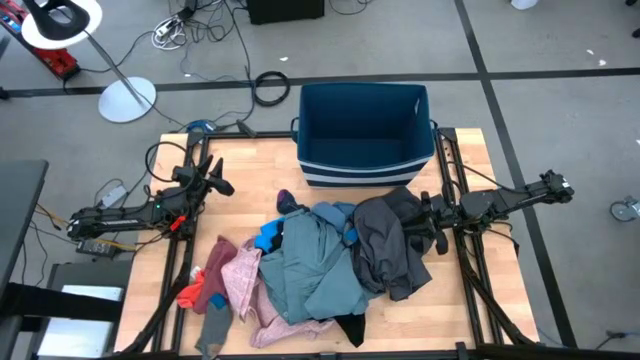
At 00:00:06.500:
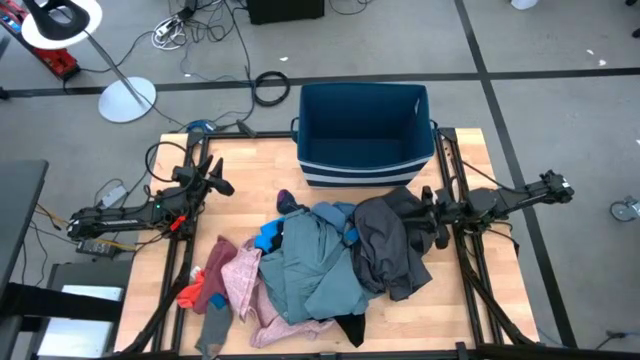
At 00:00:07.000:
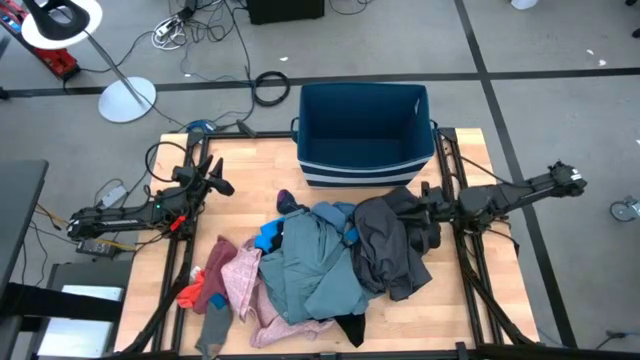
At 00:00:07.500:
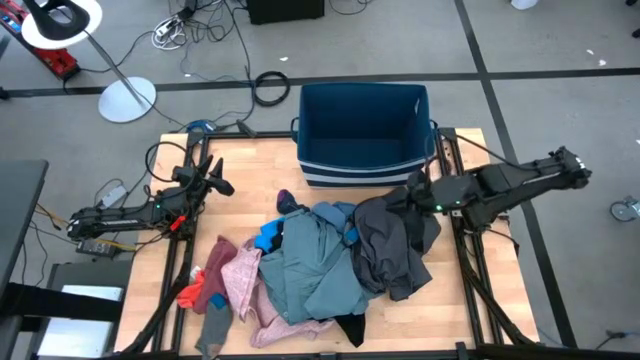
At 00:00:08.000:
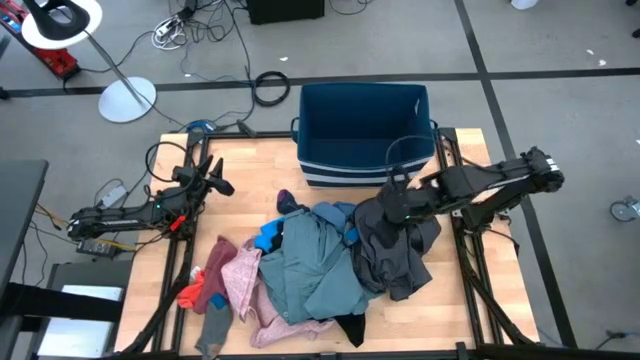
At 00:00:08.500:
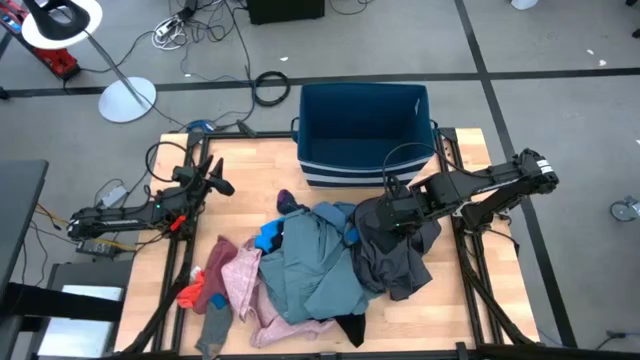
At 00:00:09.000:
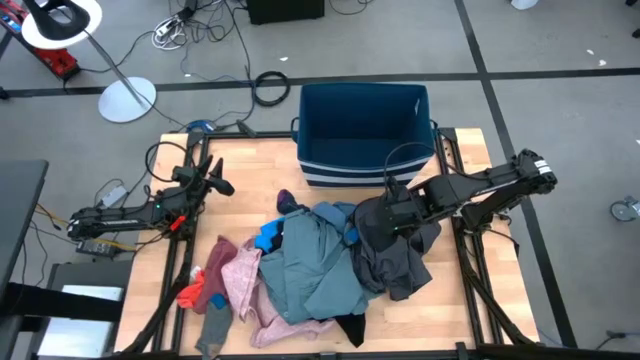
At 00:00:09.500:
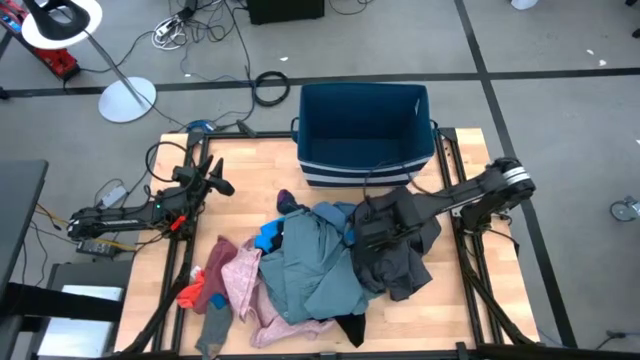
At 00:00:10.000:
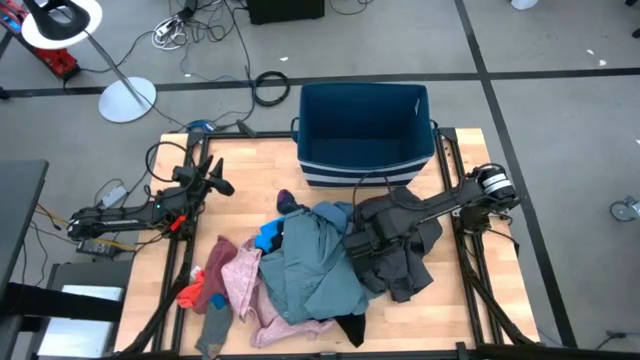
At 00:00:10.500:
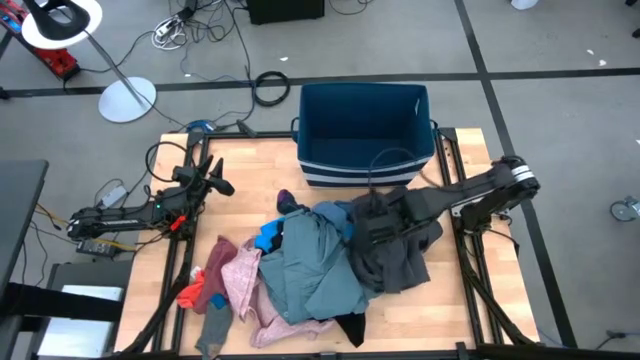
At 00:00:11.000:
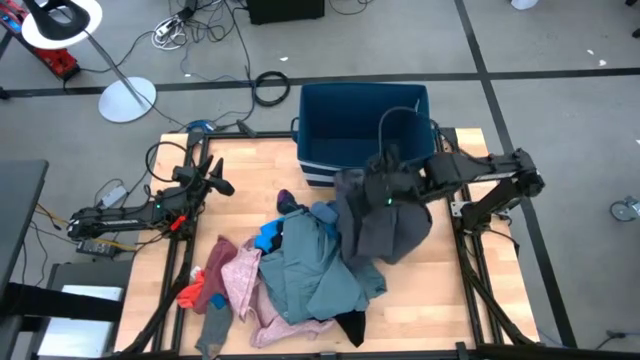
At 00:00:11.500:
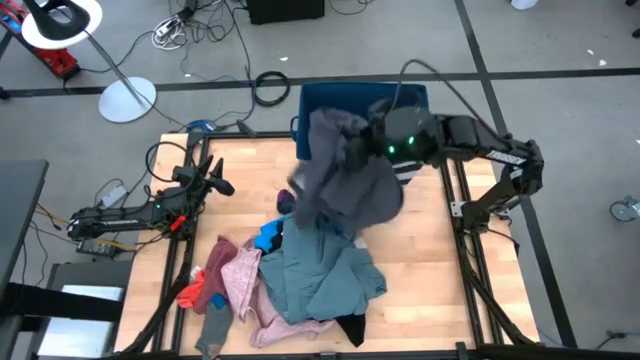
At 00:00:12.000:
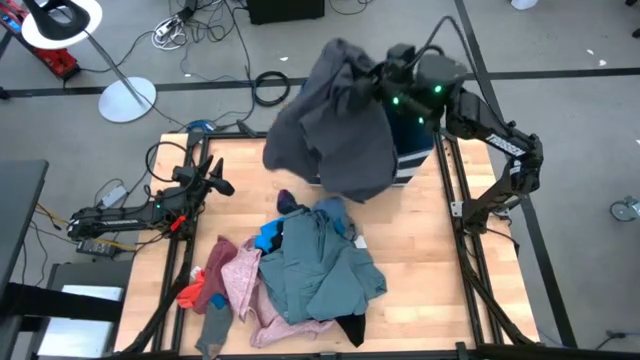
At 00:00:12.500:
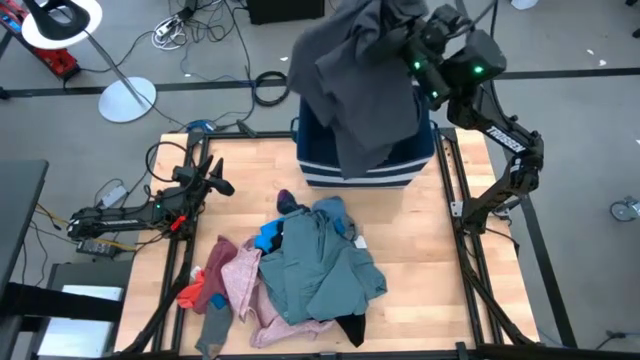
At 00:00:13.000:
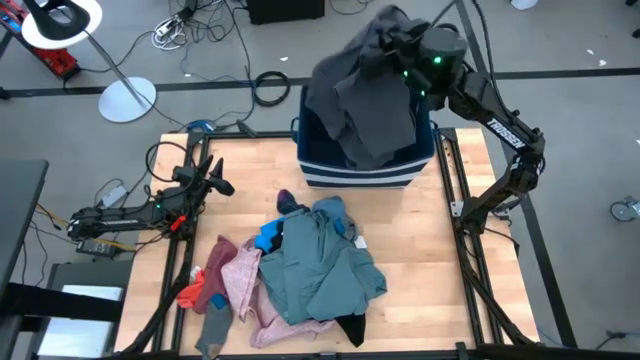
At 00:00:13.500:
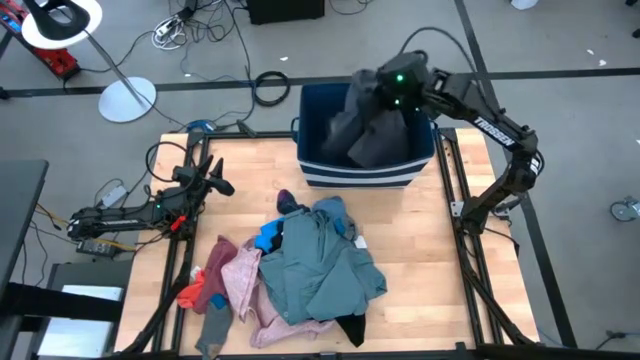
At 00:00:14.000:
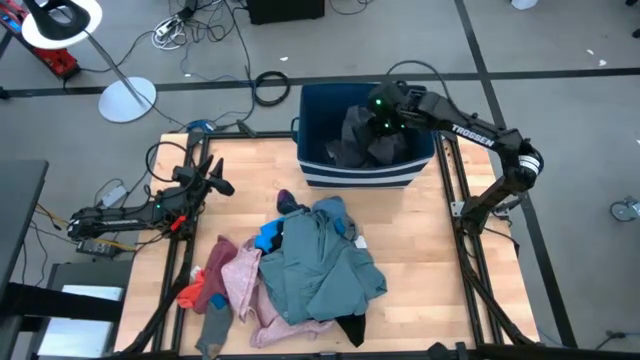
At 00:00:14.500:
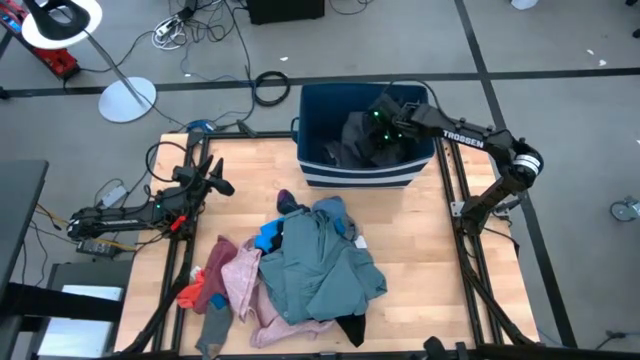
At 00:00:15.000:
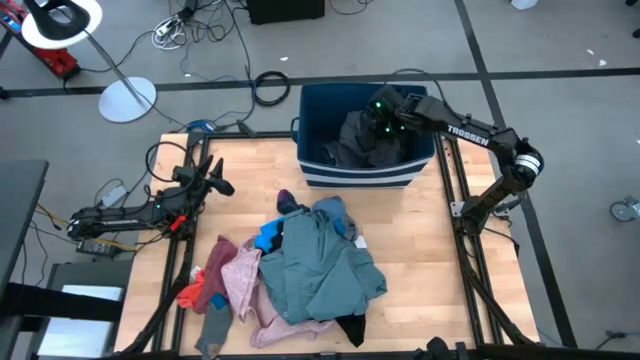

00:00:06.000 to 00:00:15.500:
Task: Sort clothes
Put the dark gray pants into the blue bin

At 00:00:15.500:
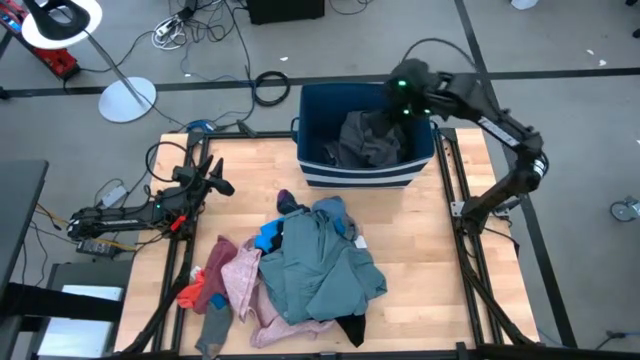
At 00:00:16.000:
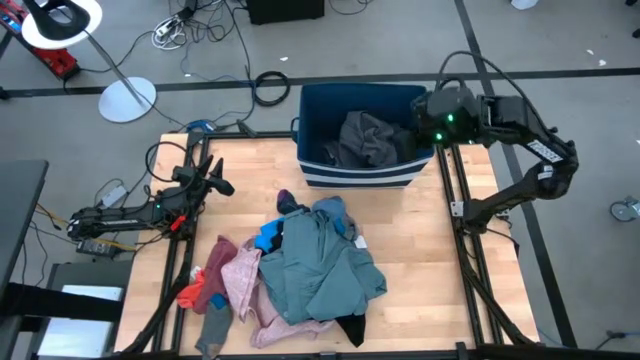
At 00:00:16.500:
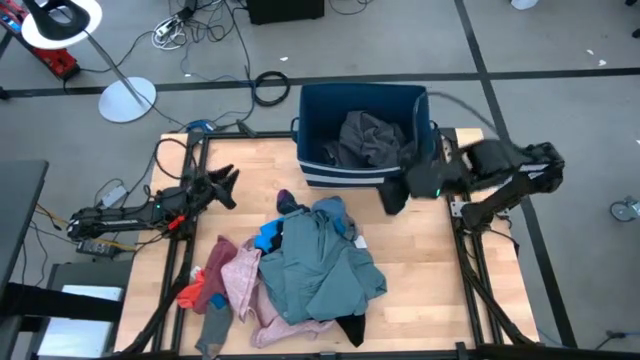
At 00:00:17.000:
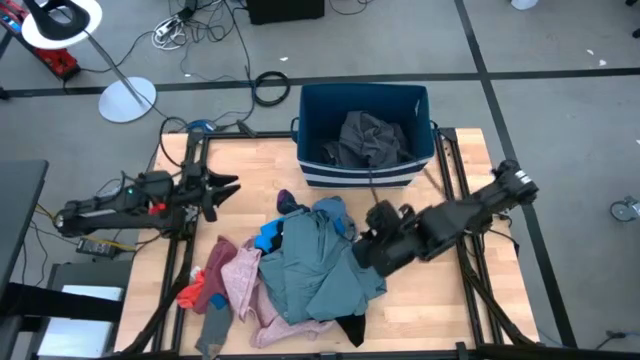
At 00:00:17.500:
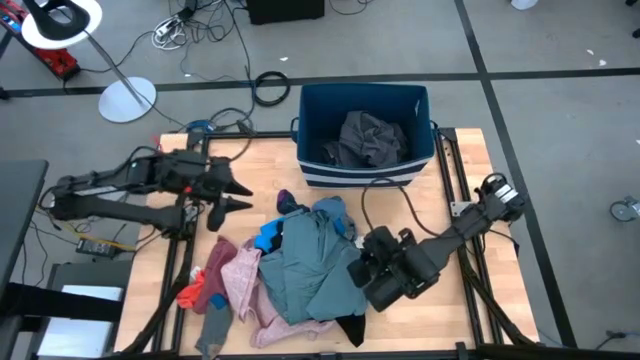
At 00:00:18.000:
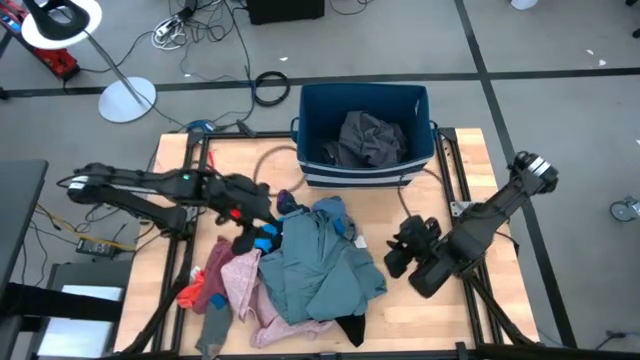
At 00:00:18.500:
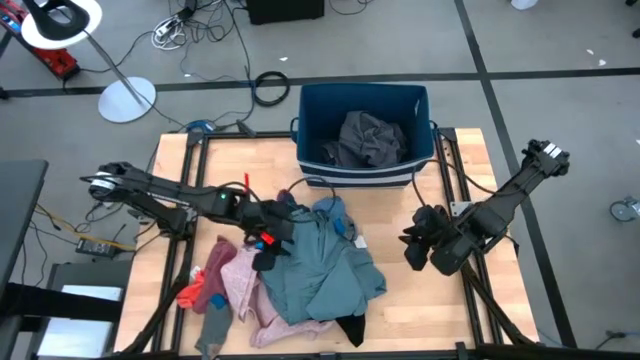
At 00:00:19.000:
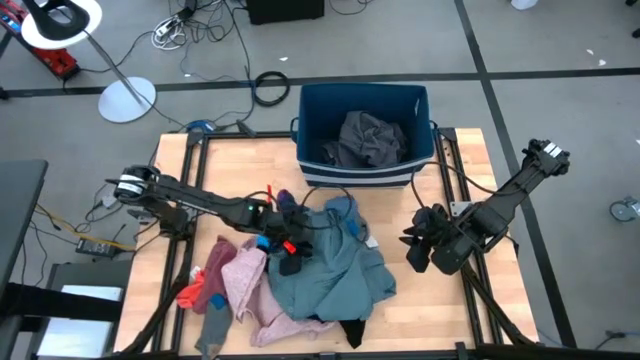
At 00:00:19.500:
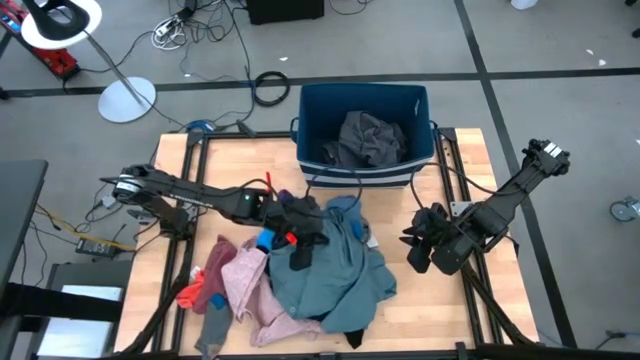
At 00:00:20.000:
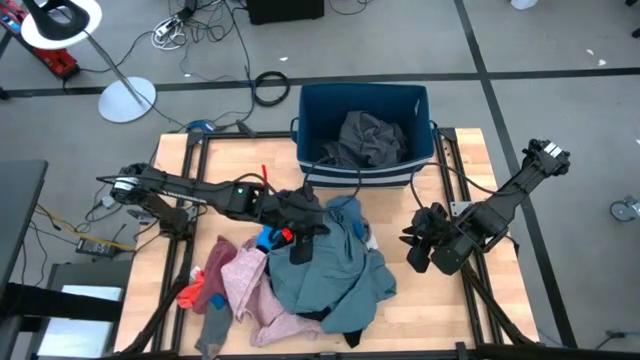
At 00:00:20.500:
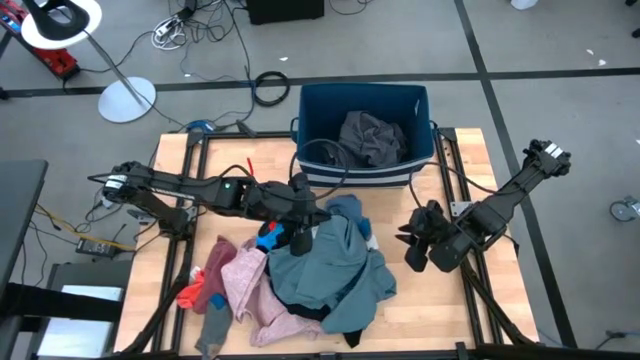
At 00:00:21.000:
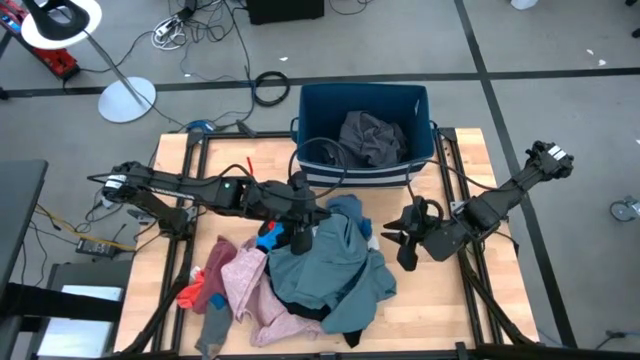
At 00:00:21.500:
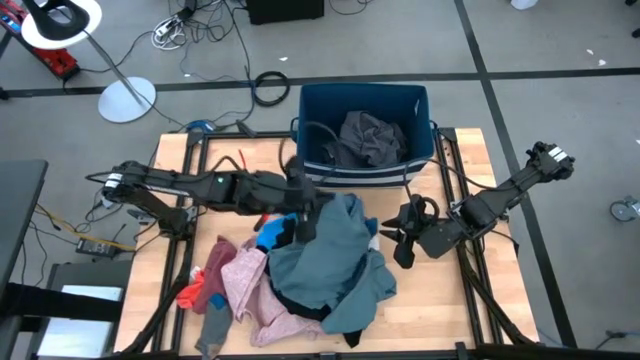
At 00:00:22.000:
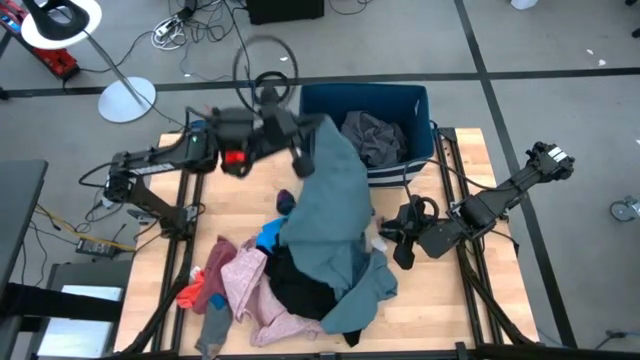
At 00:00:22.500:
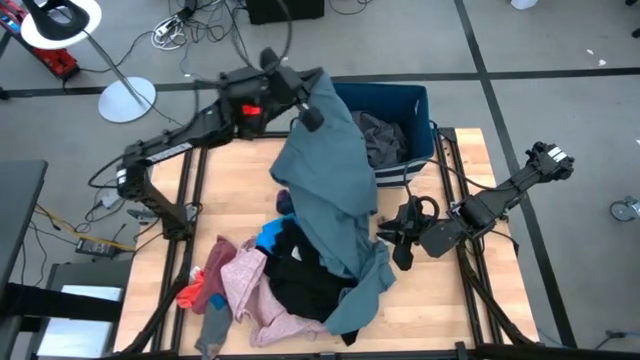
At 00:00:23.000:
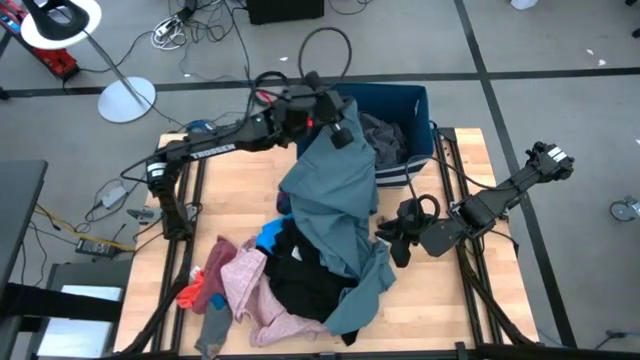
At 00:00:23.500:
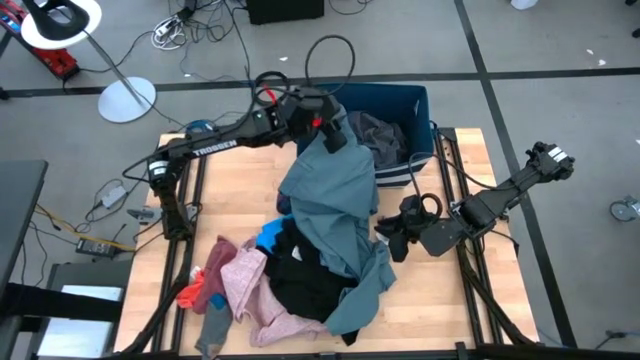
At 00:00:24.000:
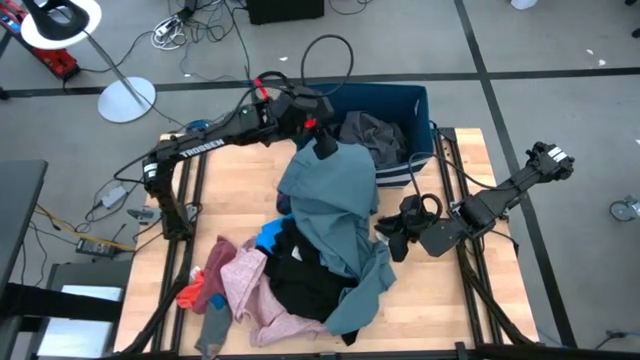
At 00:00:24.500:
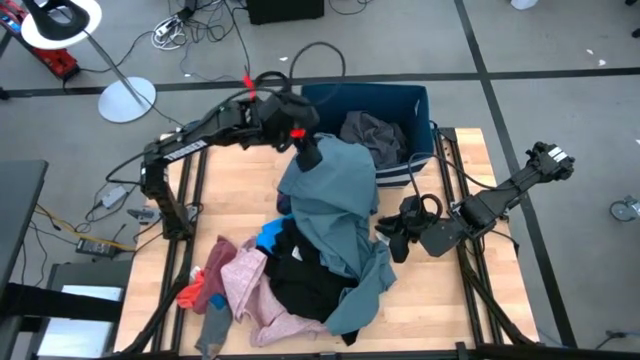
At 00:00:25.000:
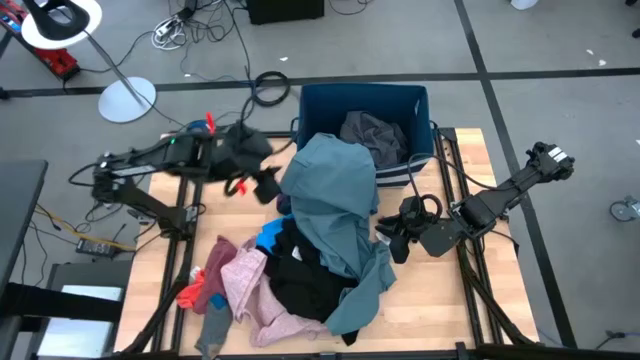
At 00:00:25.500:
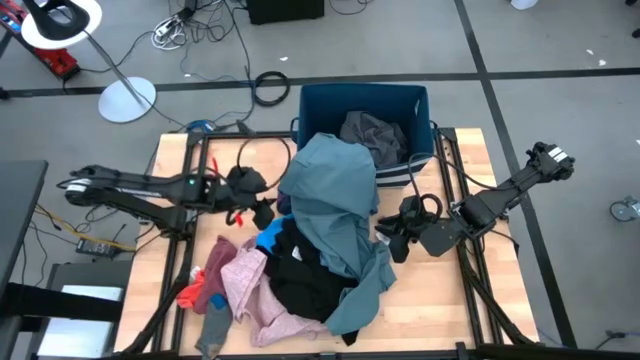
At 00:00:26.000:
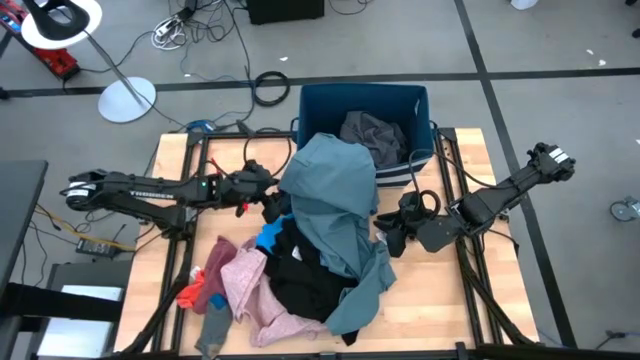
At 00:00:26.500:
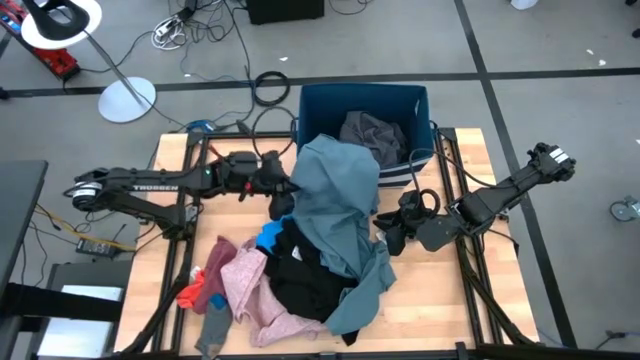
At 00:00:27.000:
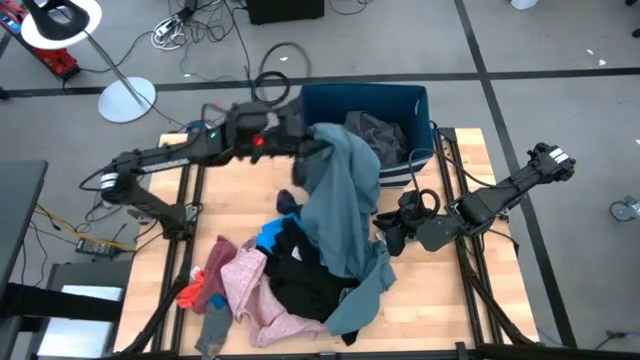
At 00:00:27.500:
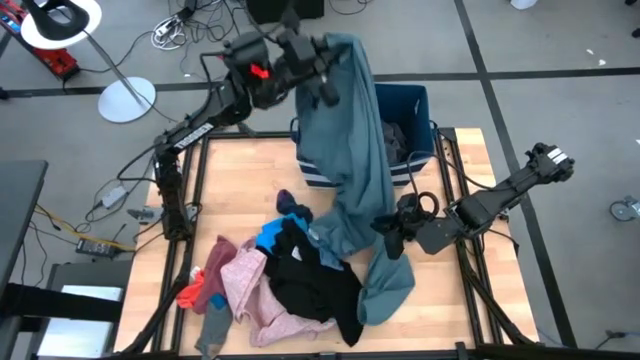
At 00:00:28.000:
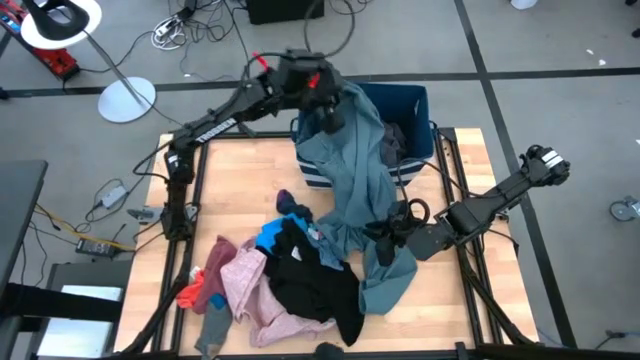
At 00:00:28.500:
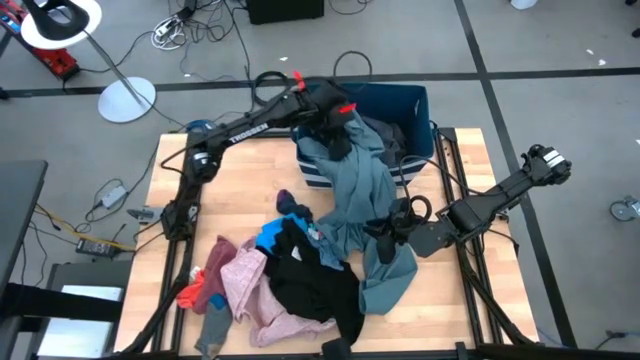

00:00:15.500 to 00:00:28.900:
Put the gray pants into the blue bin
